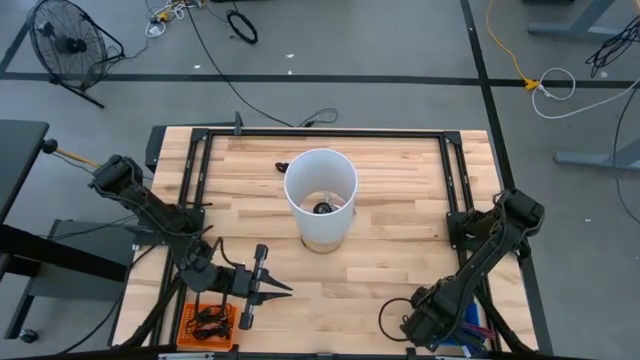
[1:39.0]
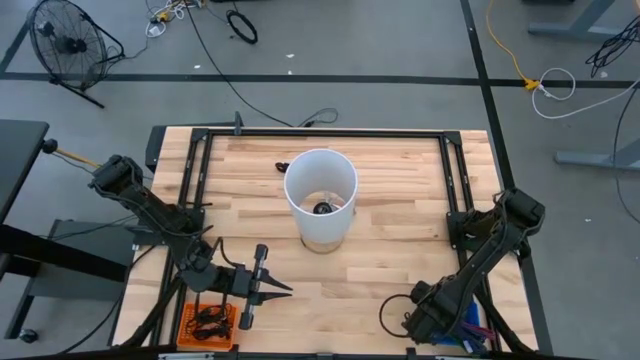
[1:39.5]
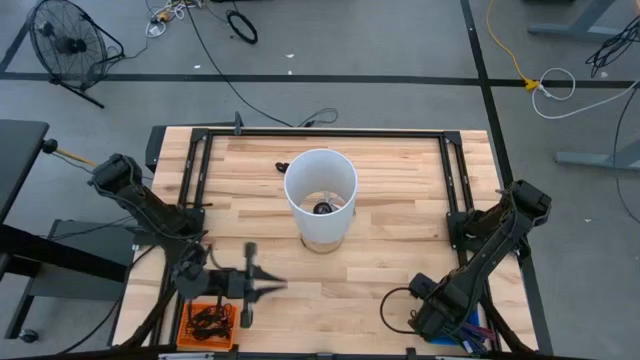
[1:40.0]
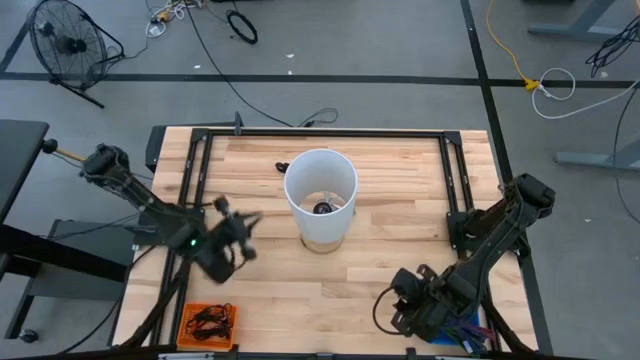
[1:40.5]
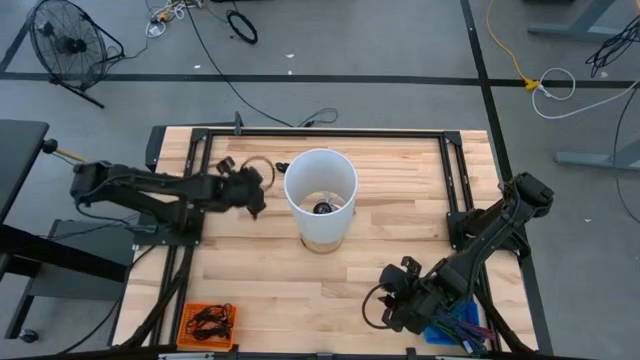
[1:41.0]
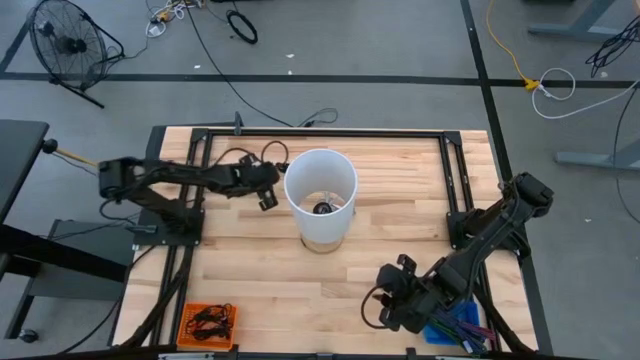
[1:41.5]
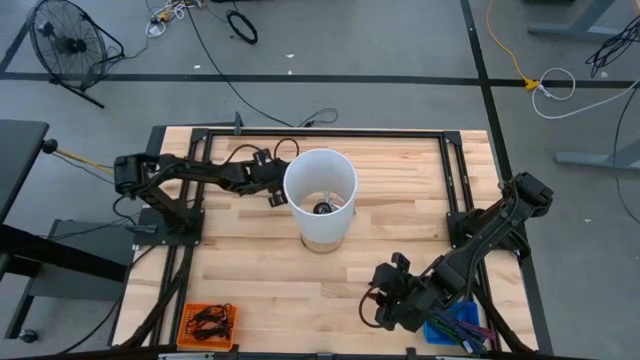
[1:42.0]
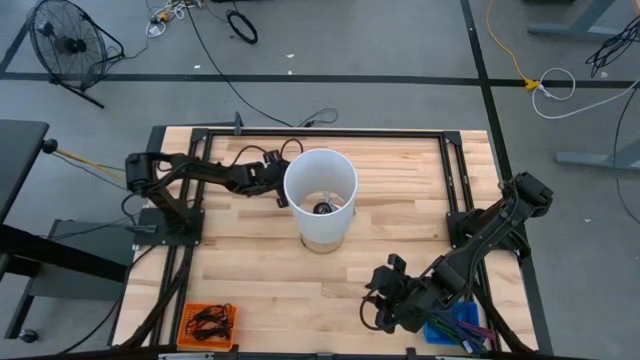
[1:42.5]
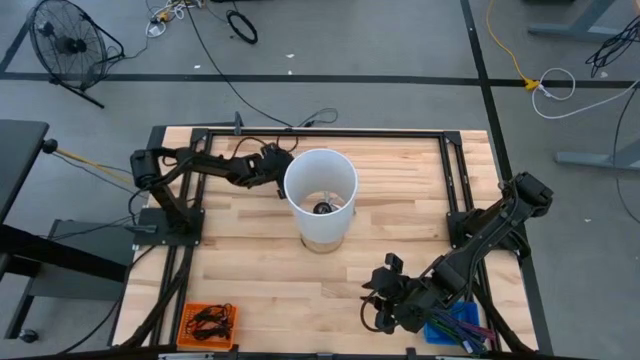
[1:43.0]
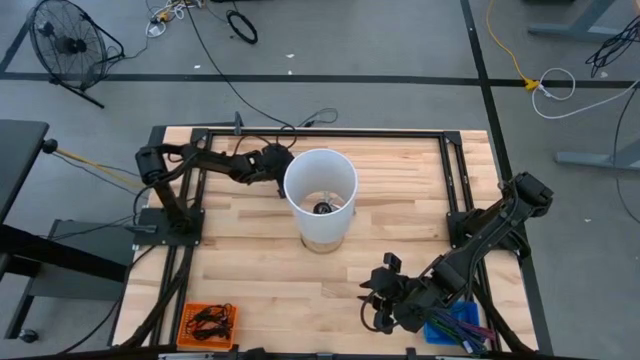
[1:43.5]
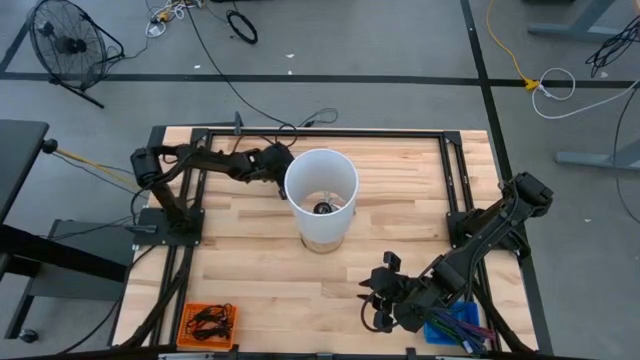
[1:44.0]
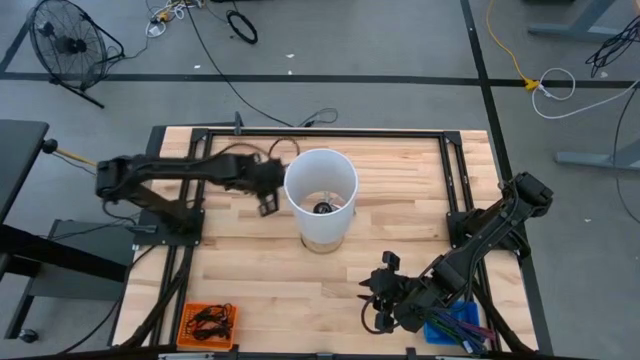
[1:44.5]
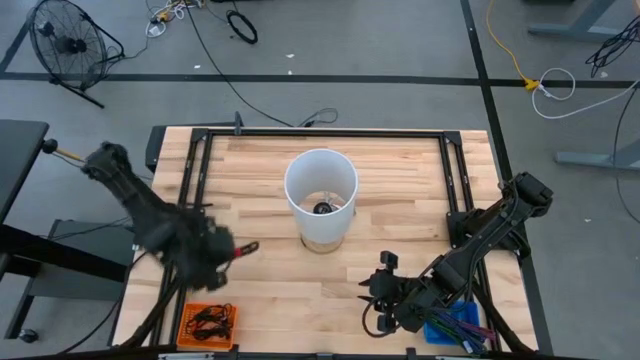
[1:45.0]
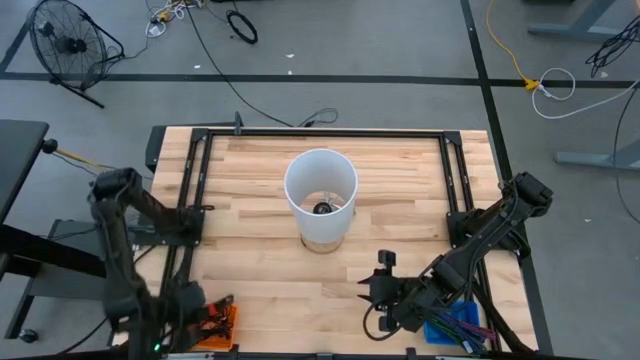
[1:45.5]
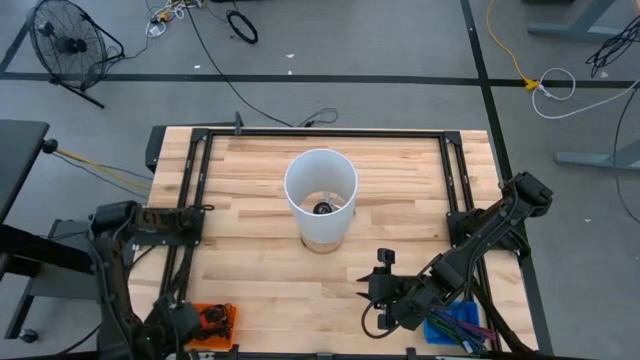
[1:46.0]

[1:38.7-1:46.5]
Task: Pick & Place USB Port
Put the black charger cable into the orange bin

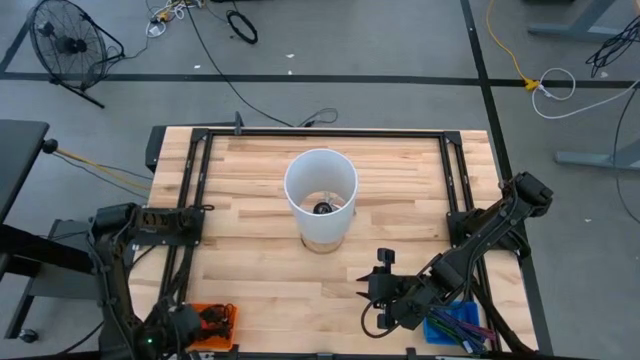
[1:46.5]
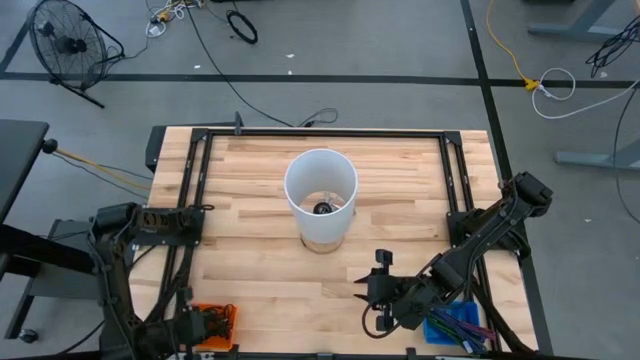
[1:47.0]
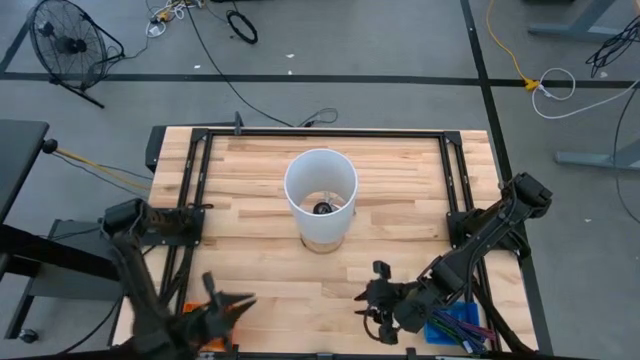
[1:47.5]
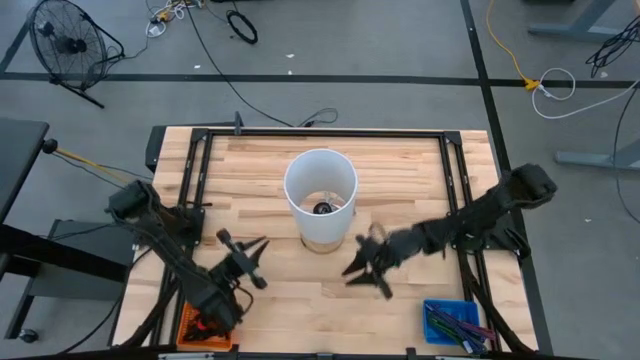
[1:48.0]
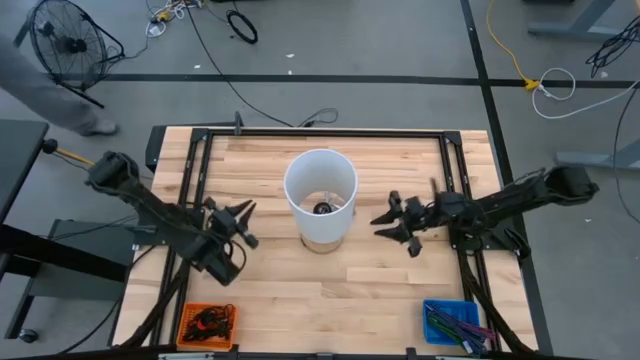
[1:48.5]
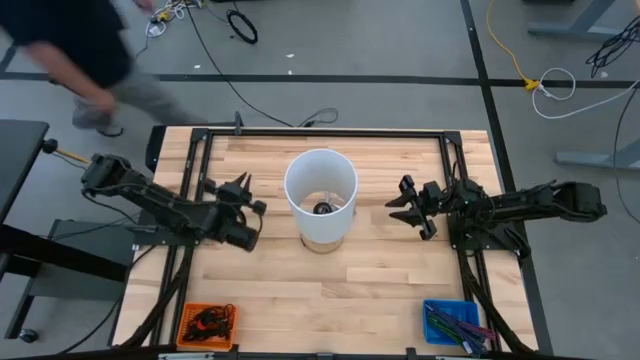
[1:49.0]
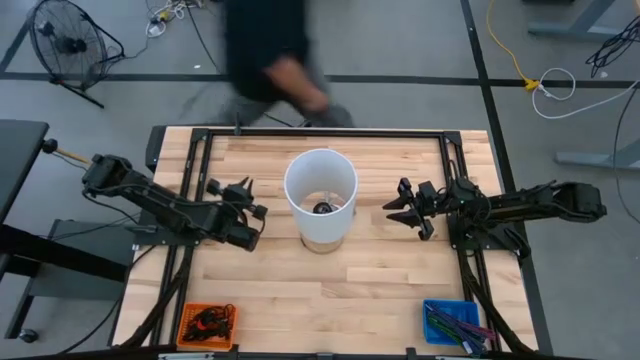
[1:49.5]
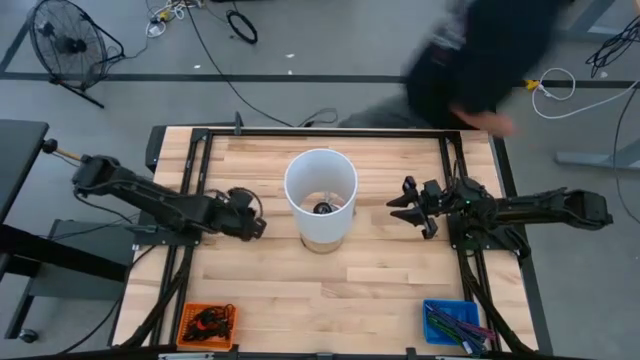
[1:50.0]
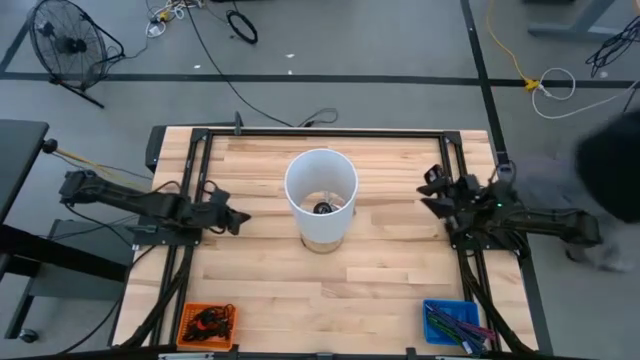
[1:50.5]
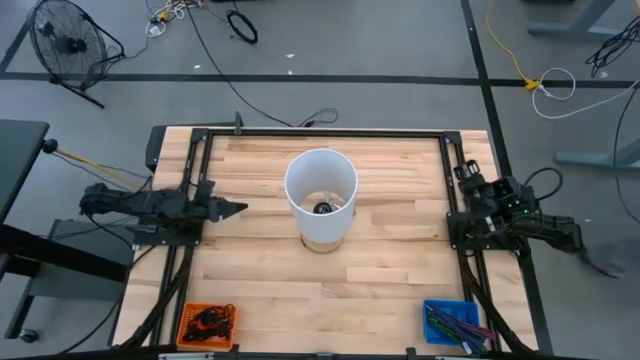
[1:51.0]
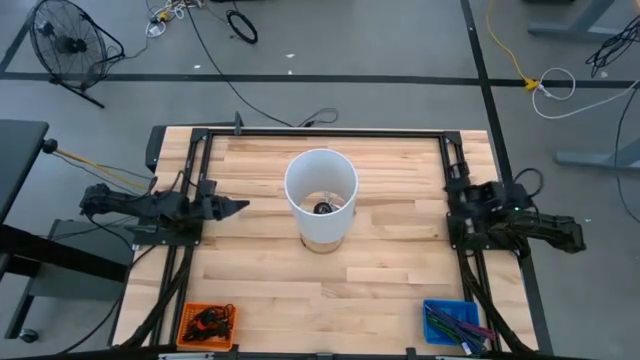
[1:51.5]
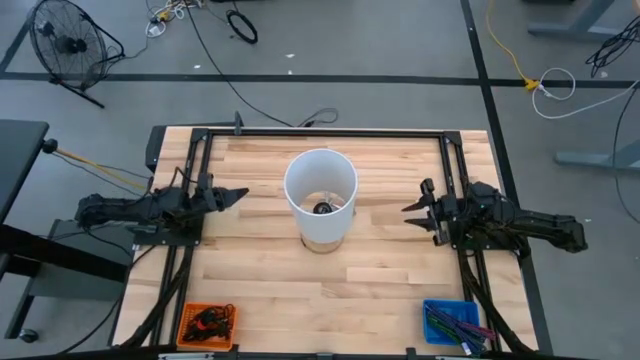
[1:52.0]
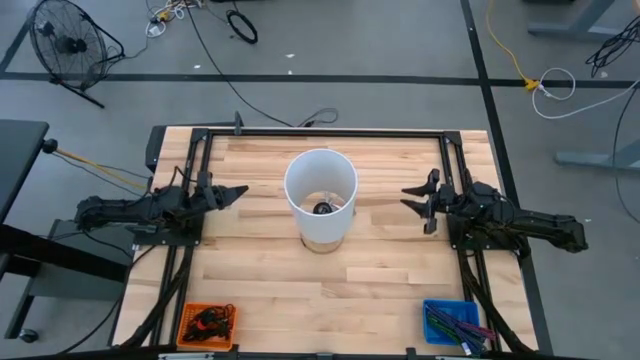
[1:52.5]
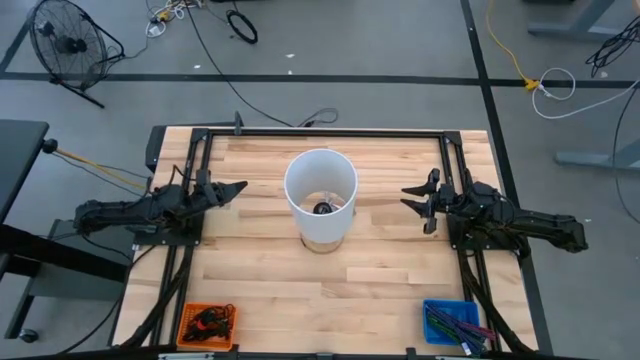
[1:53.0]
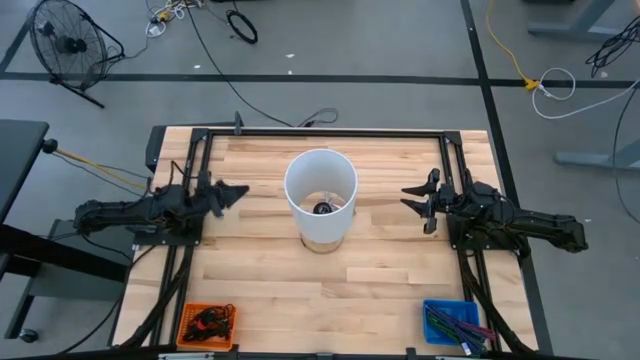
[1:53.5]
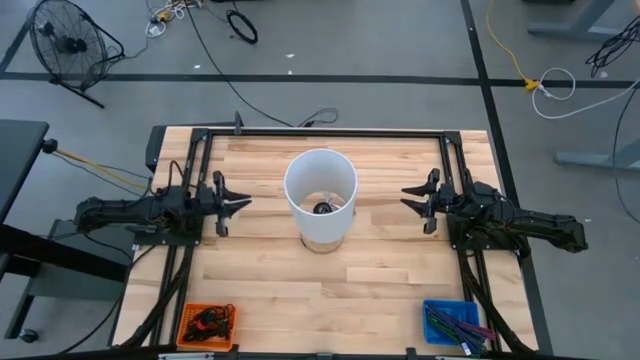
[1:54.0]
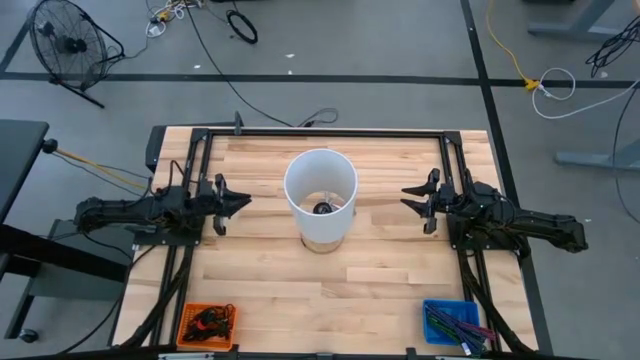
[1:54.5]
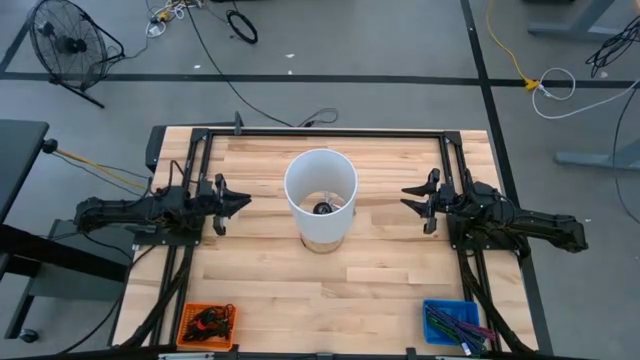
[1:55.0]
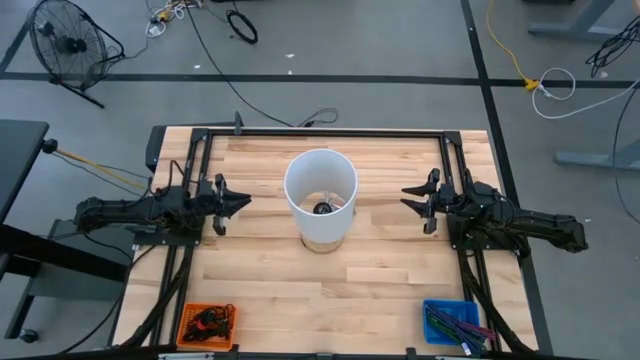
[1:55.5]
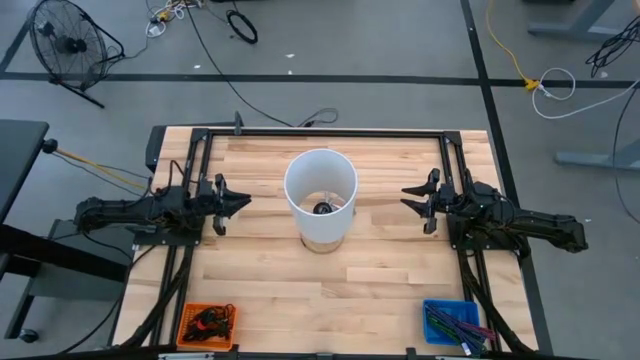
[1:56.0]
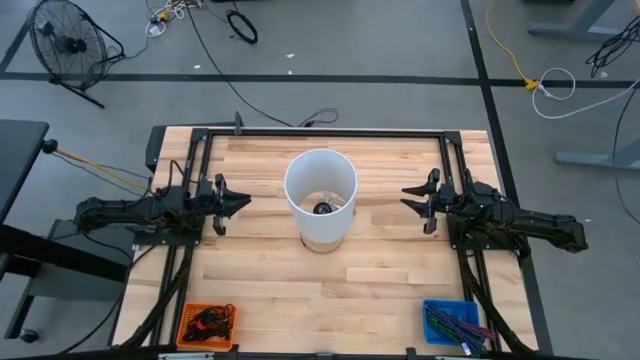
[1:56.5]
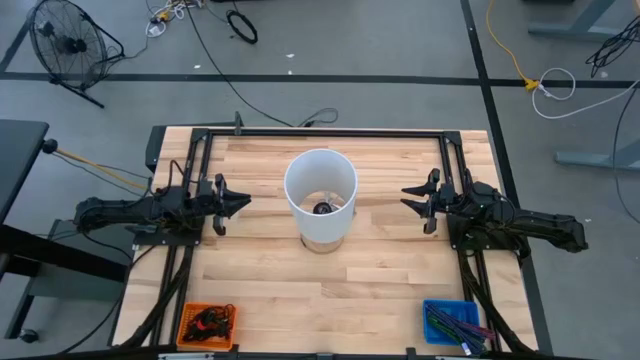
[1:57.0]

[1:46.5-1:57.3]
Return to Home Position

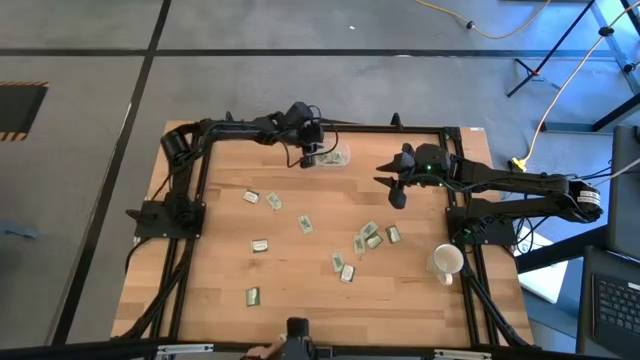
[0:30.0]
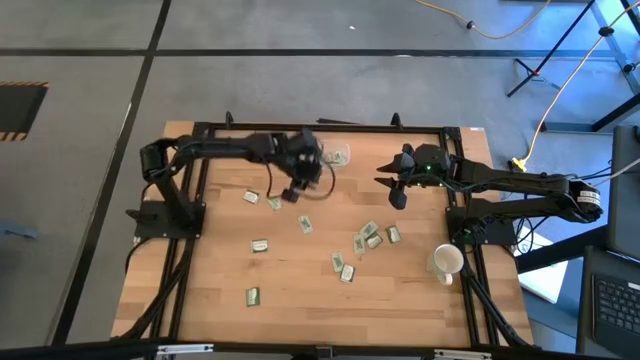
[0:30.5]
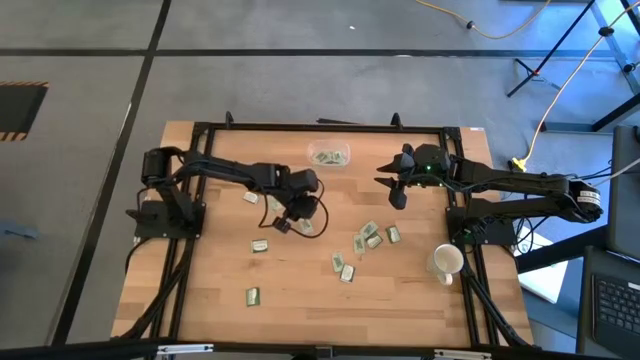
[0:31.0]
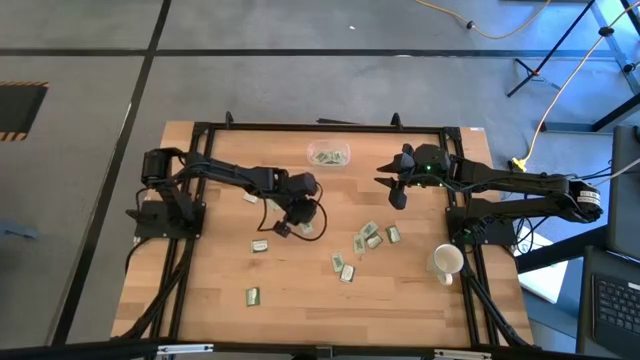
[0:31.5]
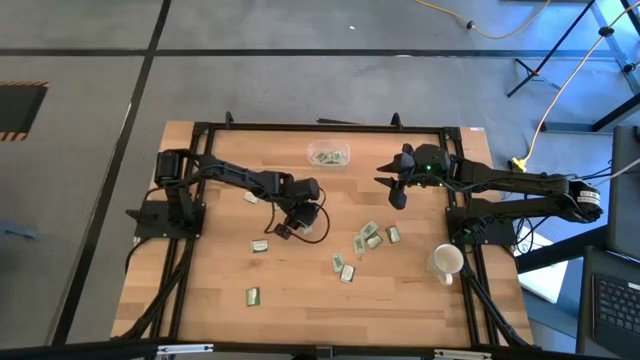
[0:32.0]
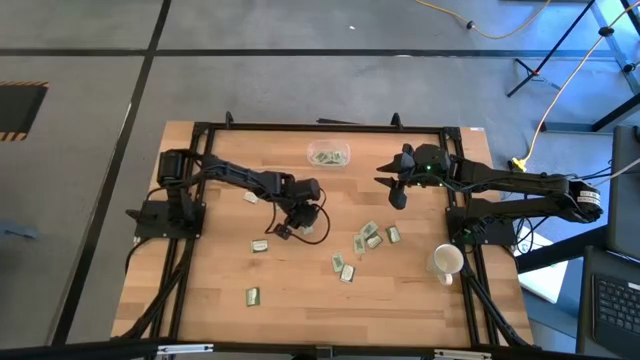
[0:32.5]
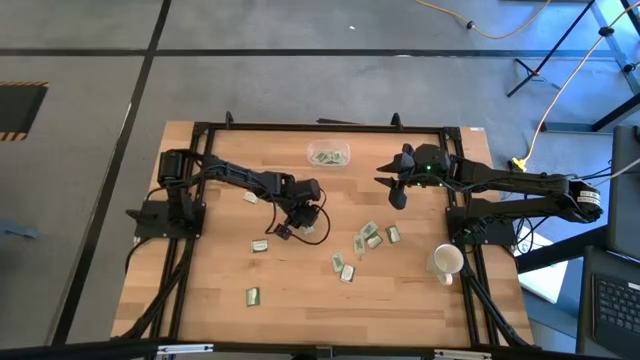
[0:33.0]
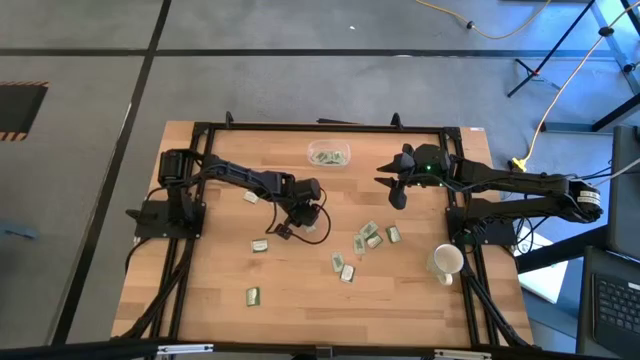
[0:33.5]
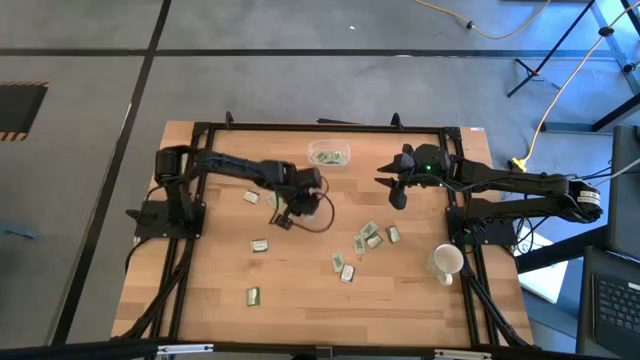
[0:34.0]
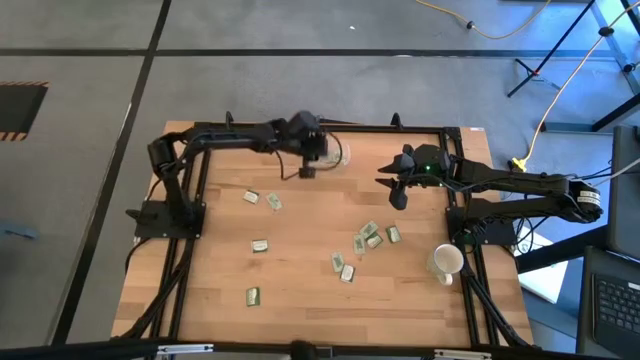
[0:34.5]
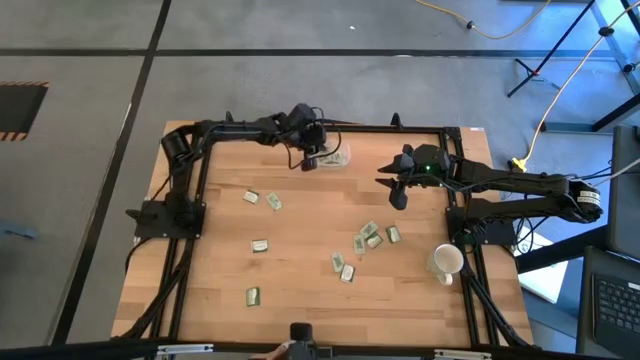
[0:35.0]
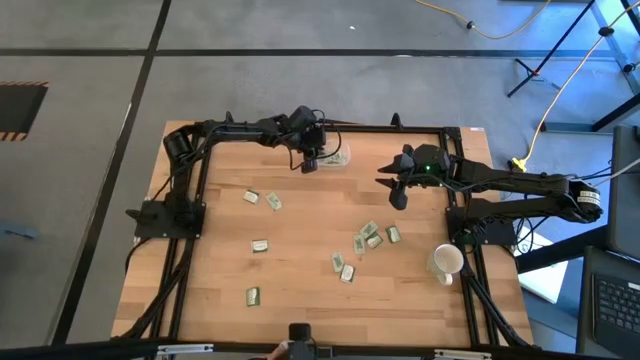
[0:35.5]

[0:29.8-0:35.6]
Task: Pick and place items into bin
Put the white stevia packet into the transparent bin
